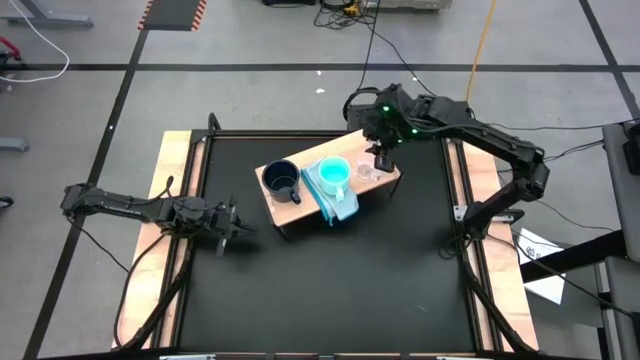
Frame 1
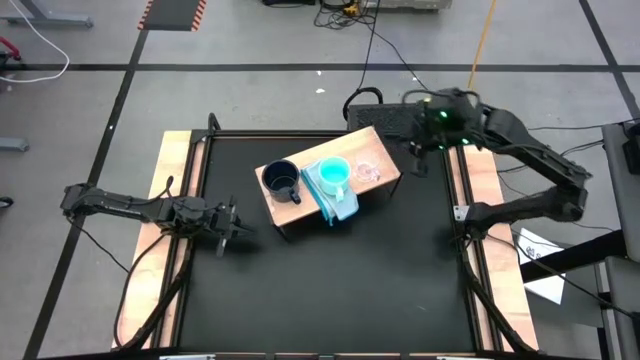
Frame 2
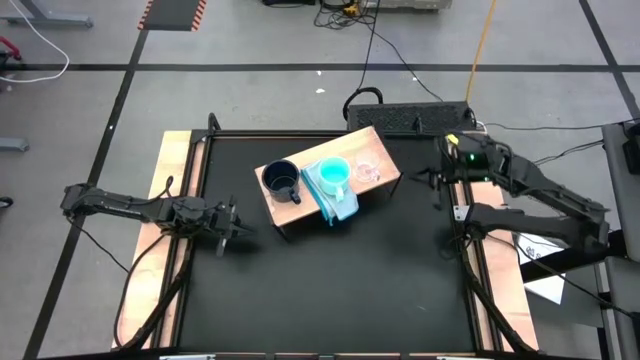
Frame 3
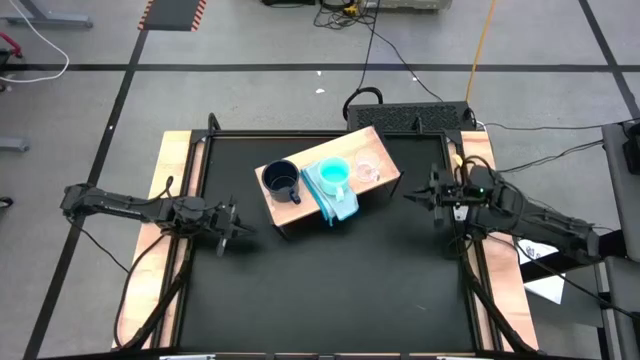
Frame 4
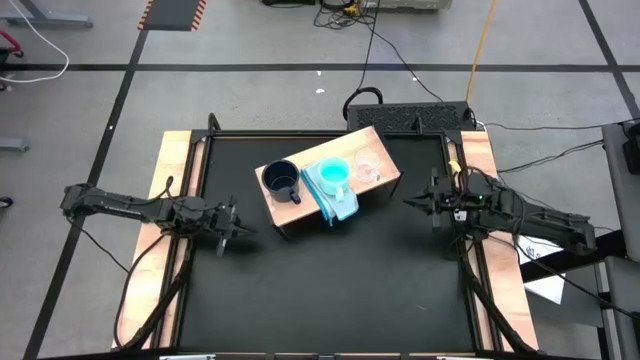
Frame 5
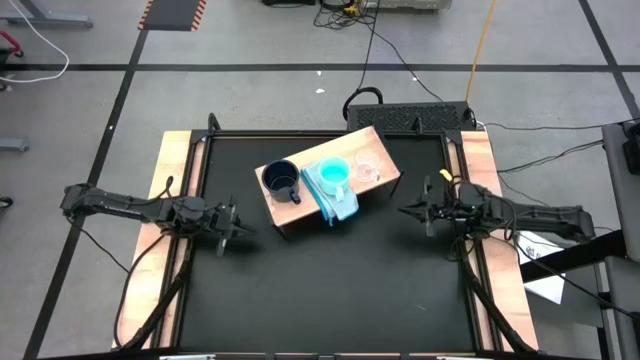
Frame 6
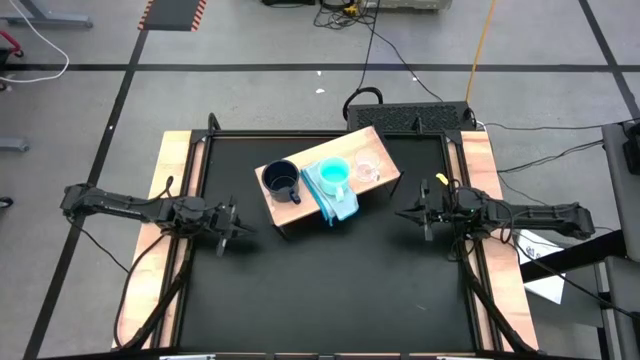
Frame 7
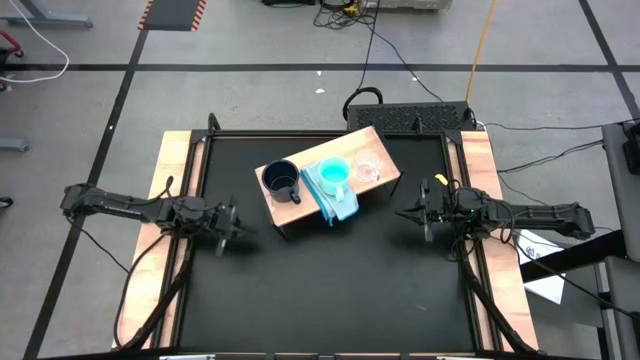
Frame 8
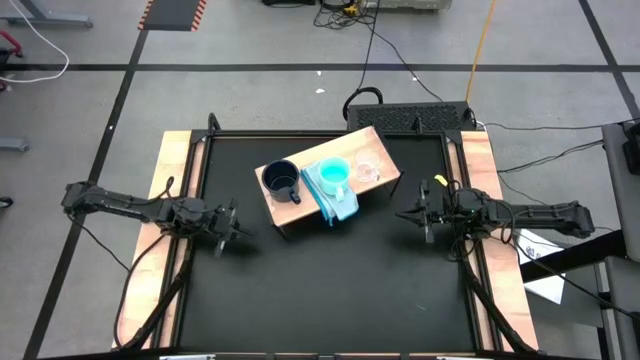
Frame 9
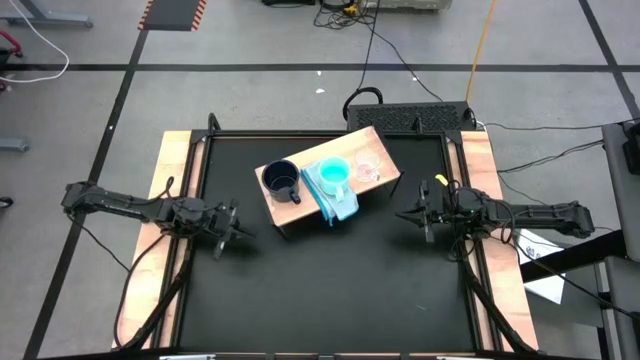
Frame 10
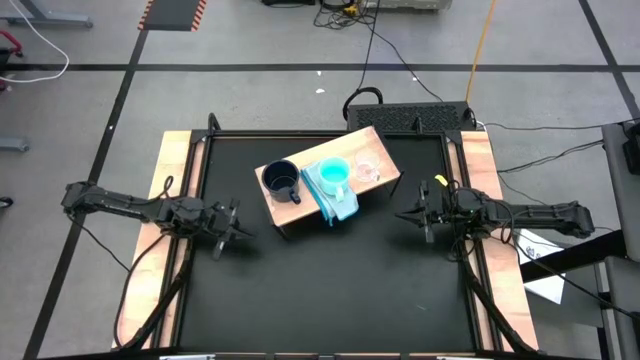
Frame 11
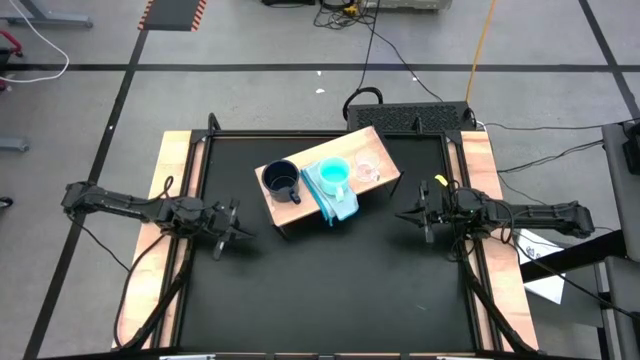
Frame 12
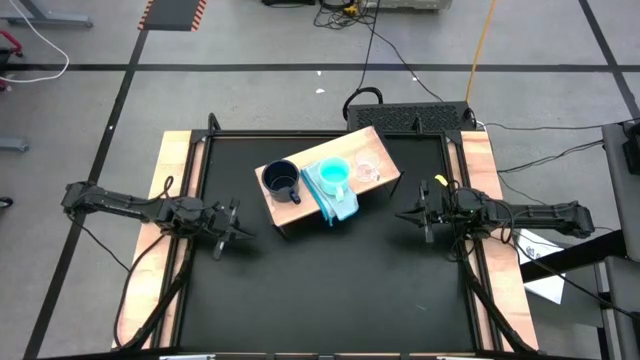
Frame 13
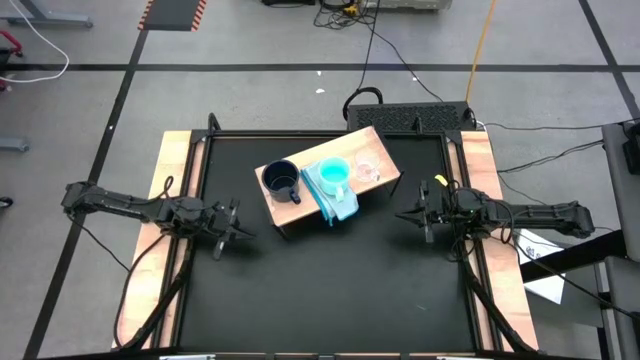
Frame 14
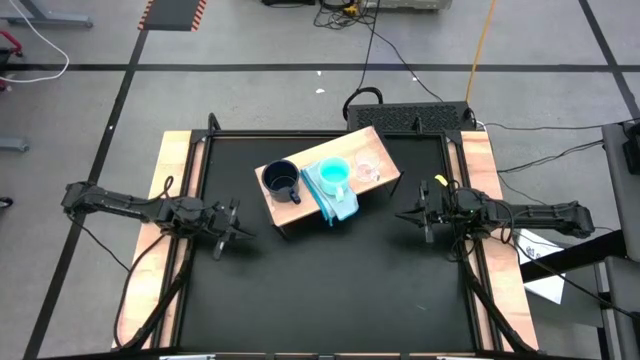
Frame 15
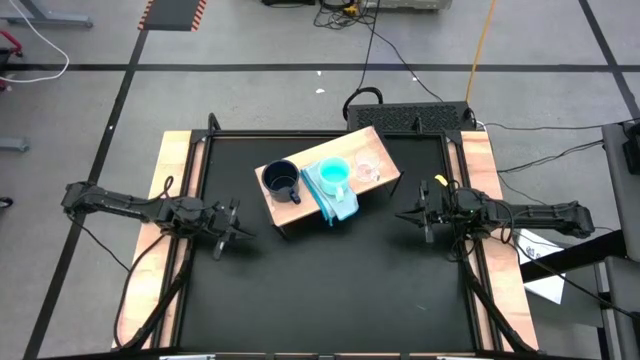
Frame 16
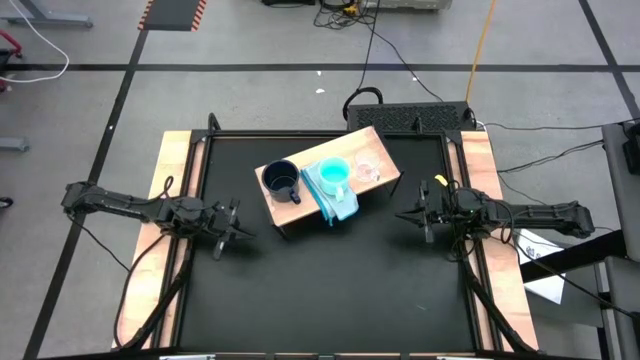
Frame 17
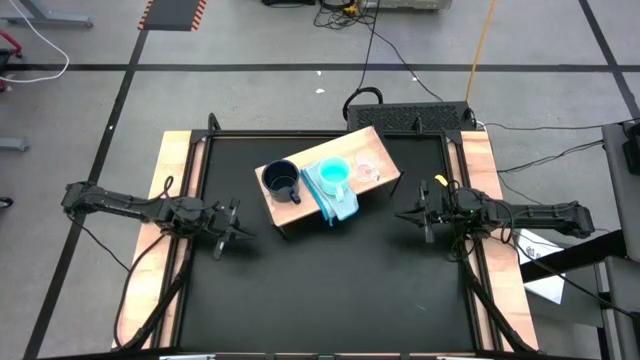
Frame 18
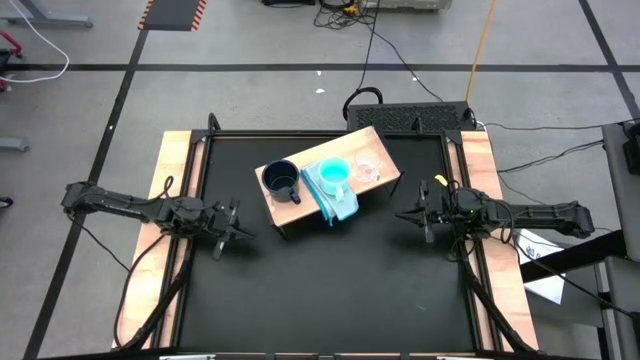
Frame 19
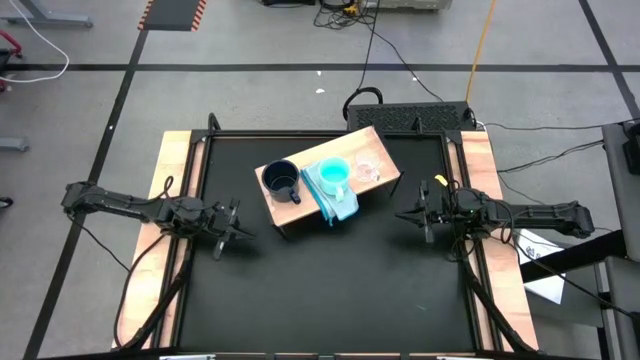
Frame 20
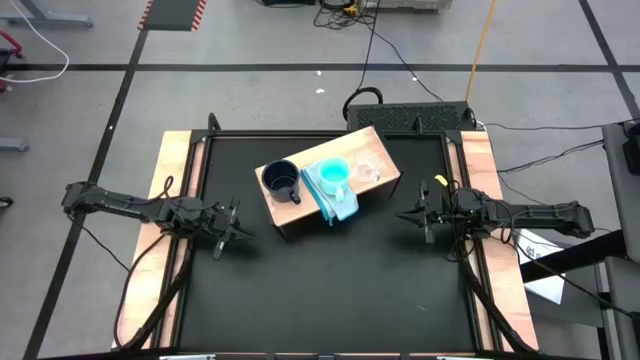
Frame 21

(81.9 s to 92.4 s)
Task: Stack small to large cups/mugs on shelf
Return to Home Position

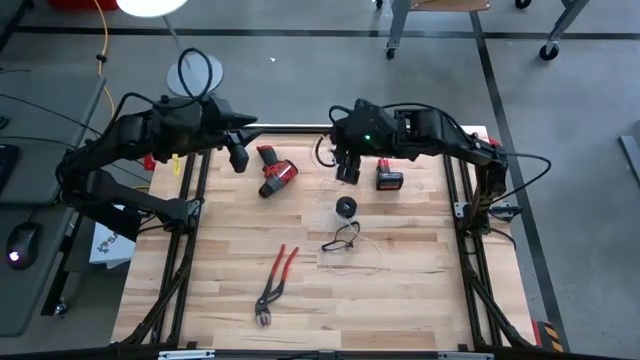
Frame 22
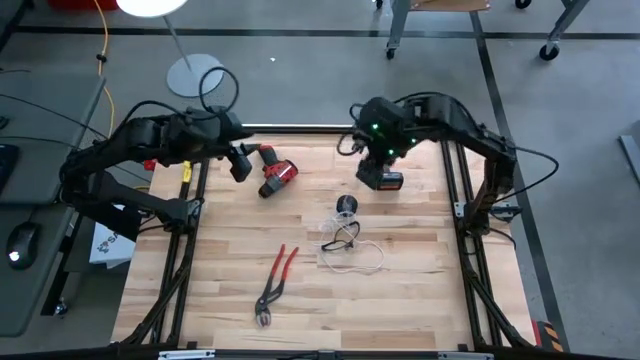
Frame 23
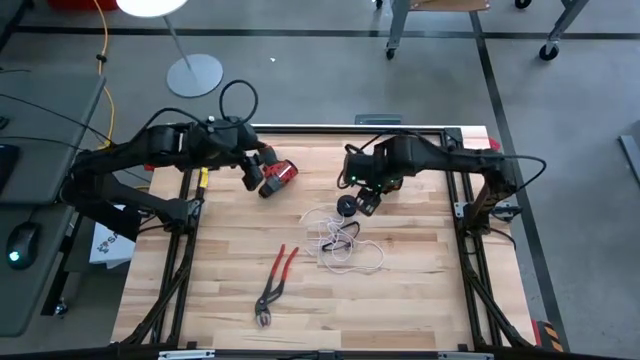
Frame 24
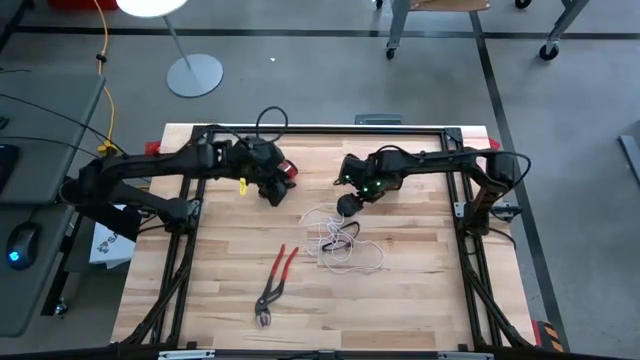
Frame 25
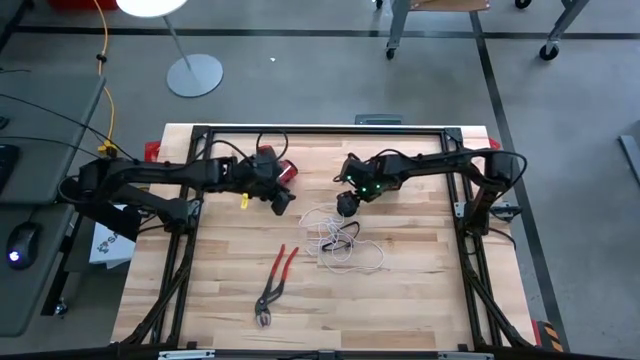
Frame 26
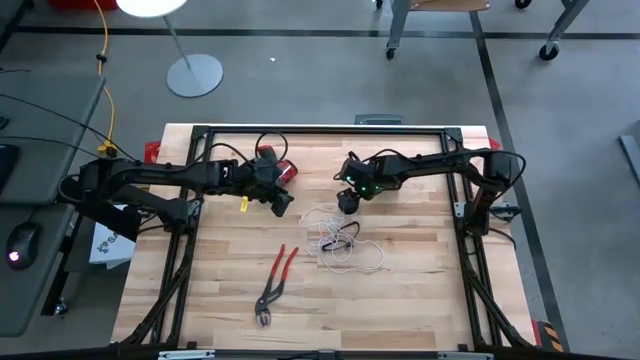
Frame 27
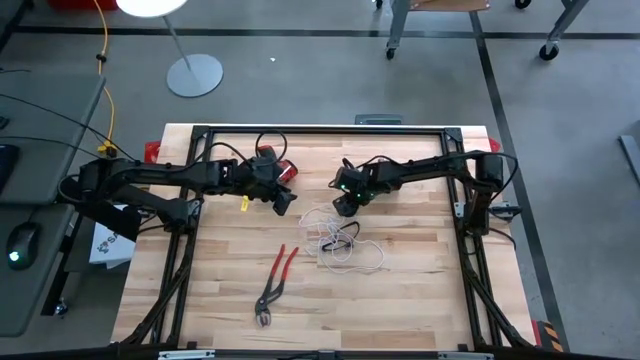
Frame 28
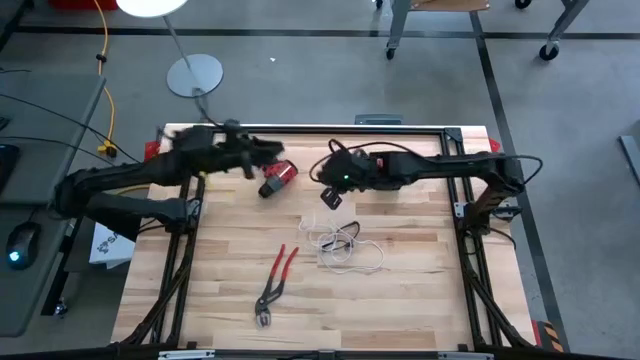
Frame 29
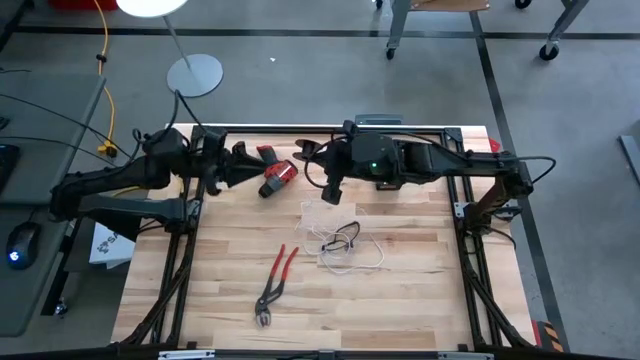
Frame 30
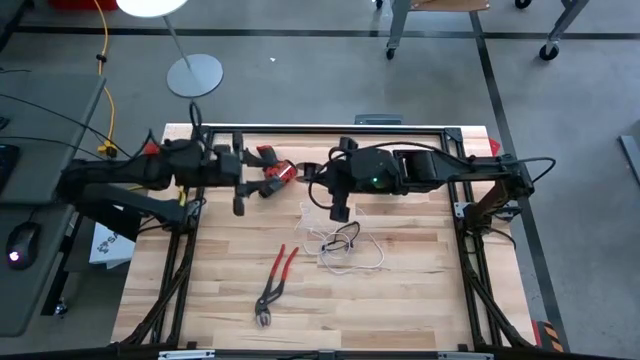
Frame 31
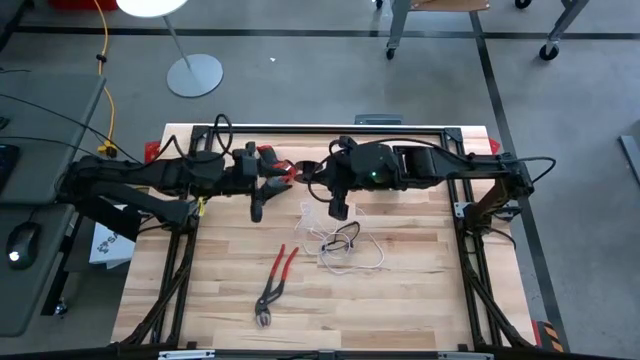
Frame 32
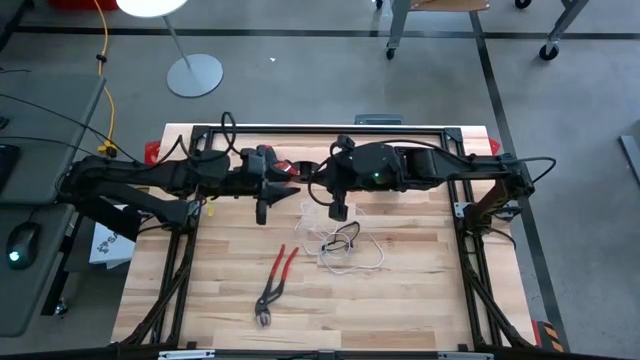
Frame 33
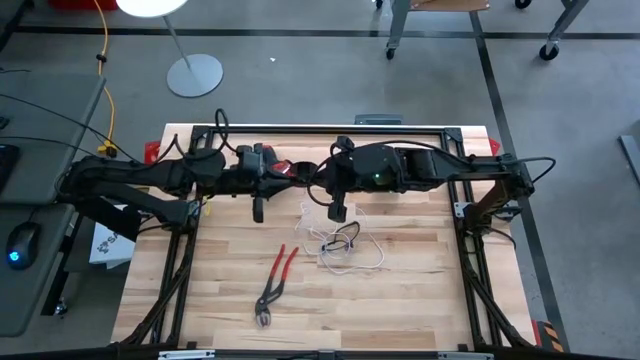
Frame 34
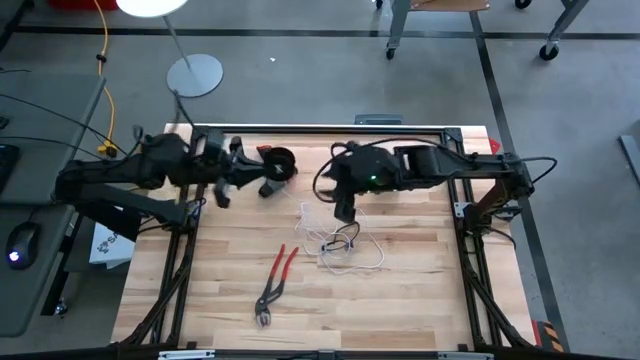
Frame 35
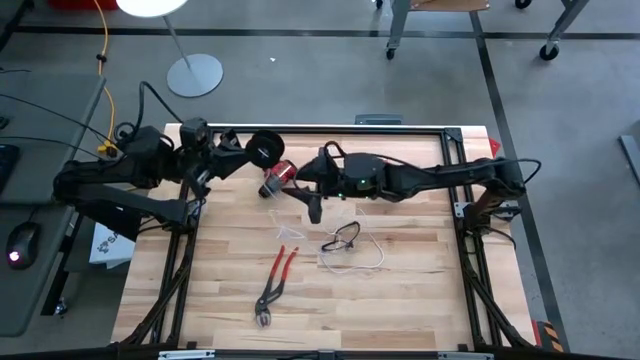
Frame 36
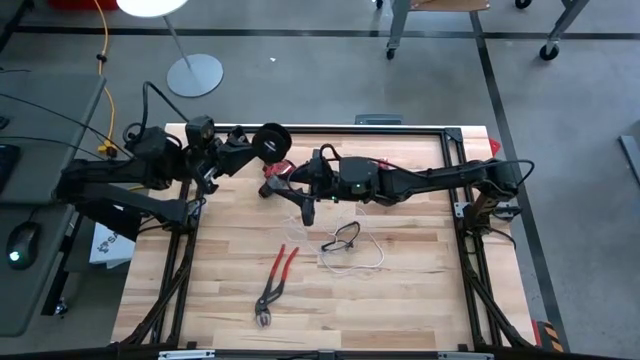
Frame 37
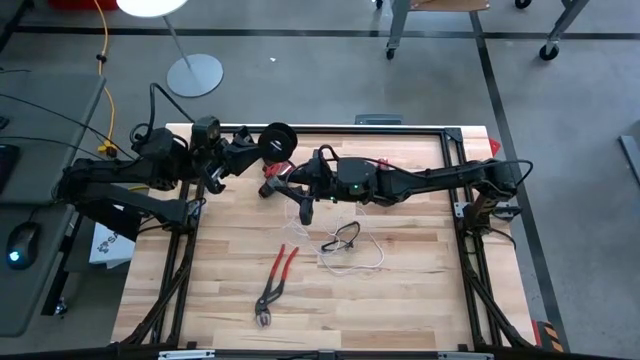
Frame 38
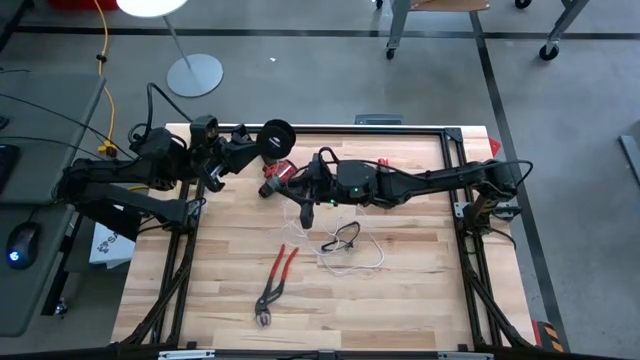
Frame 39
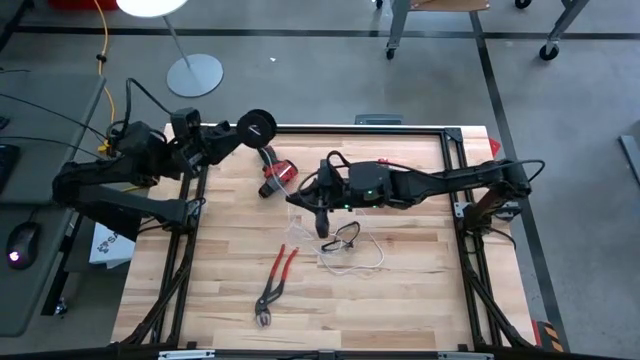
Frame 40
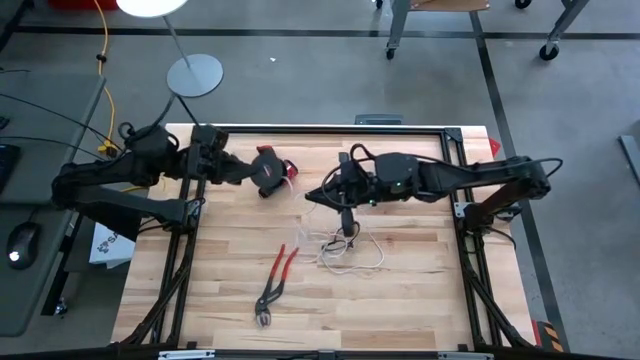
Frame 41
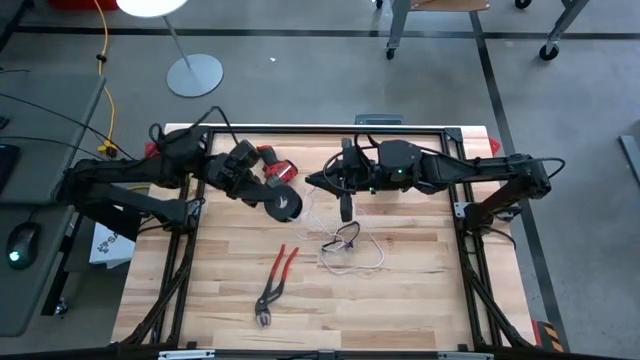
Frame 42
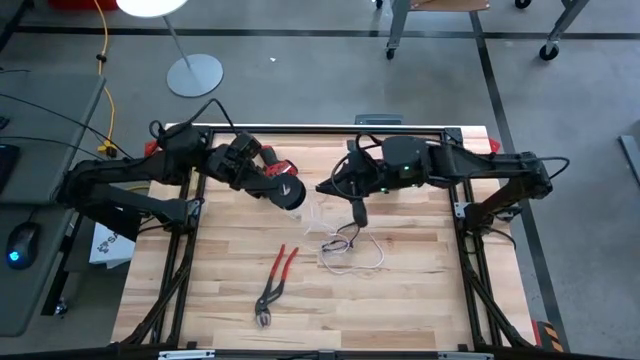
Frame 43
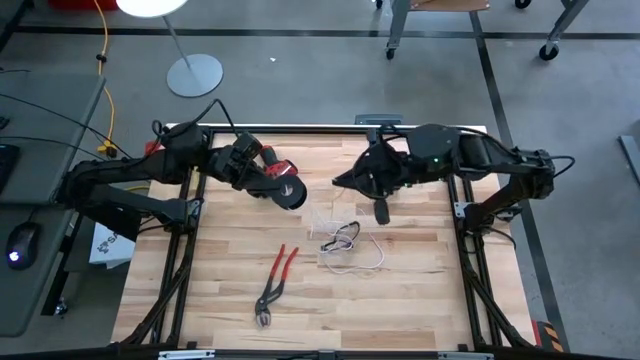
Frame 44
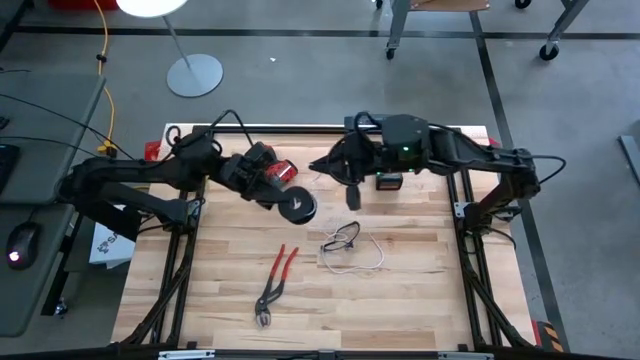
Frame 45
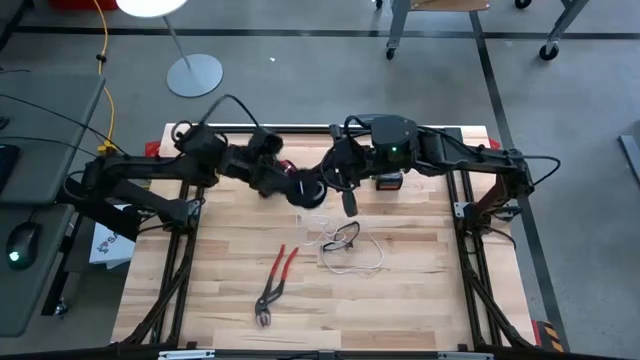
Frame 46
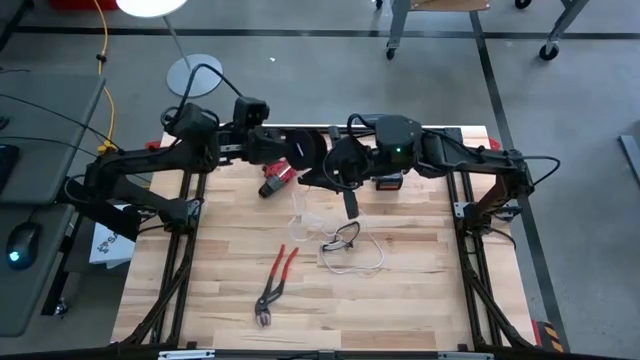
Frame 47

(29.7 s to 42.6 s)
Task: Coil cords
Coil the white wire onto the black spool
